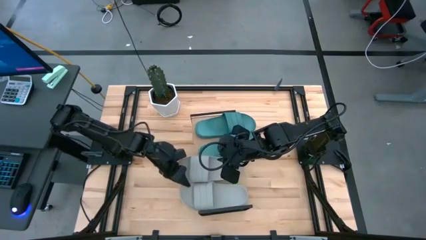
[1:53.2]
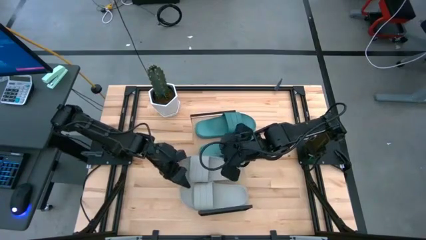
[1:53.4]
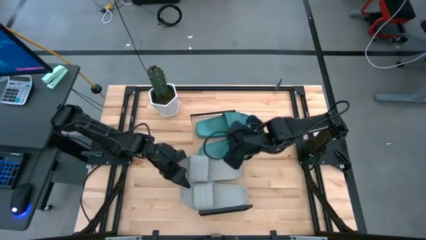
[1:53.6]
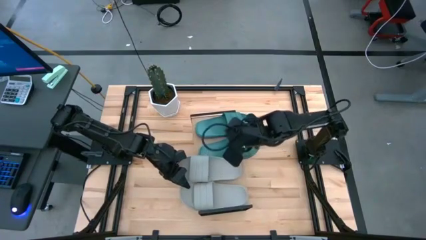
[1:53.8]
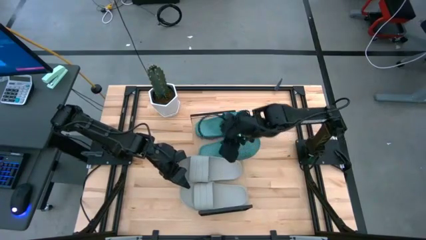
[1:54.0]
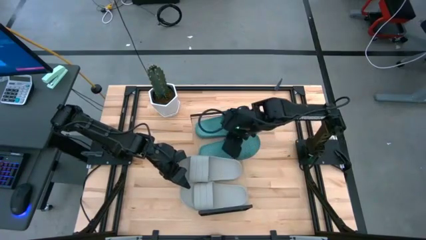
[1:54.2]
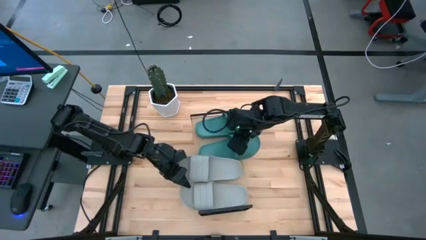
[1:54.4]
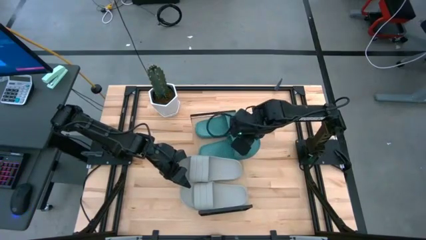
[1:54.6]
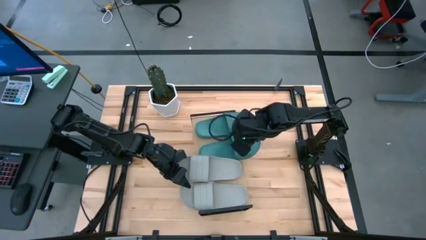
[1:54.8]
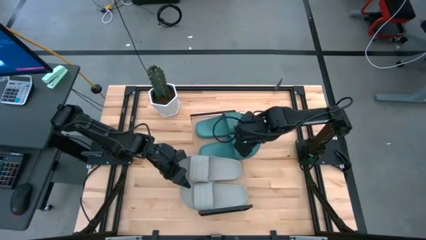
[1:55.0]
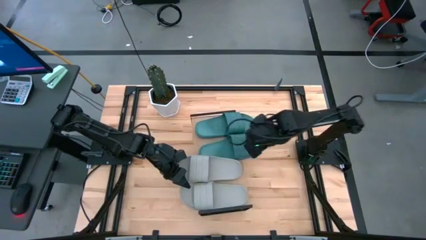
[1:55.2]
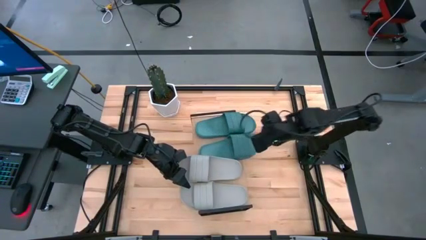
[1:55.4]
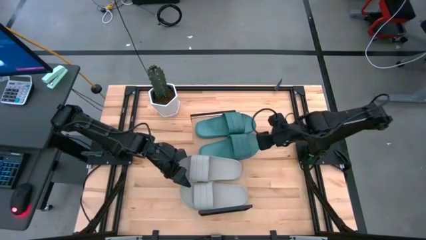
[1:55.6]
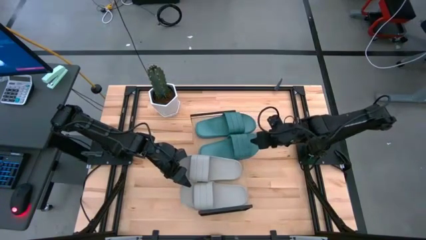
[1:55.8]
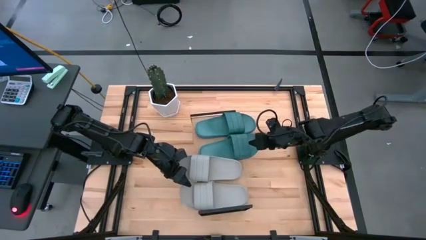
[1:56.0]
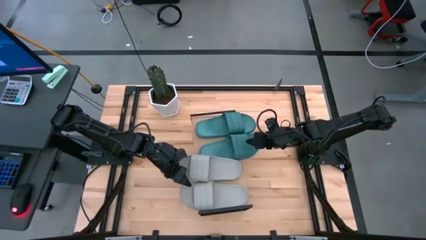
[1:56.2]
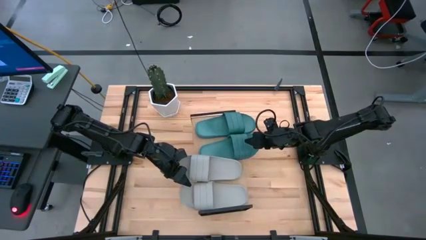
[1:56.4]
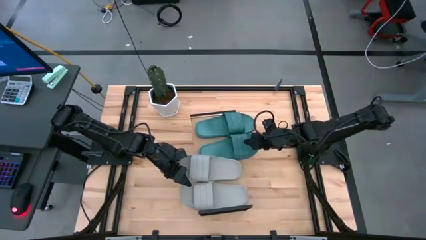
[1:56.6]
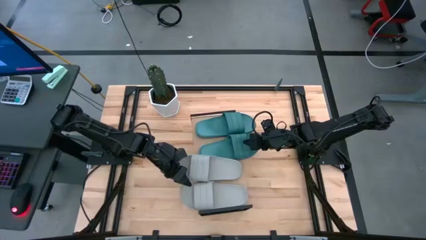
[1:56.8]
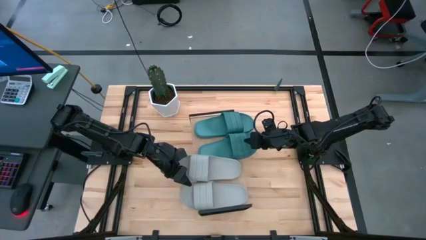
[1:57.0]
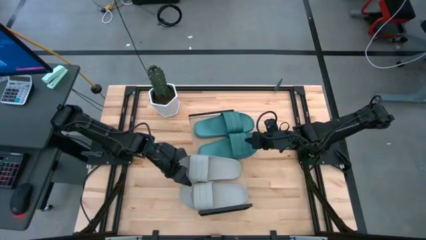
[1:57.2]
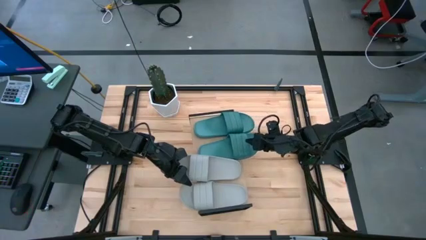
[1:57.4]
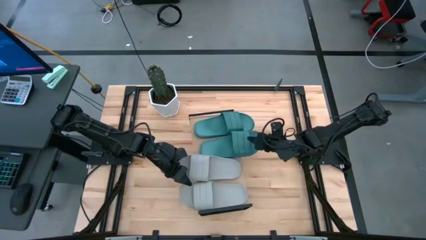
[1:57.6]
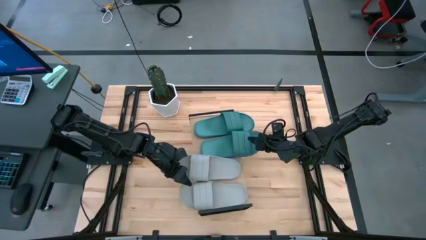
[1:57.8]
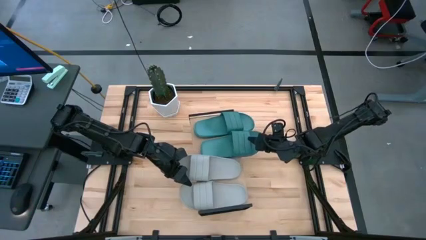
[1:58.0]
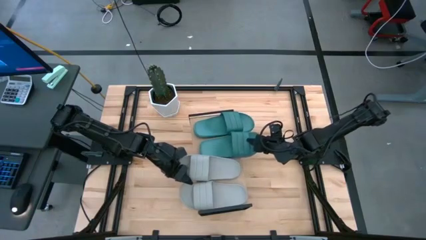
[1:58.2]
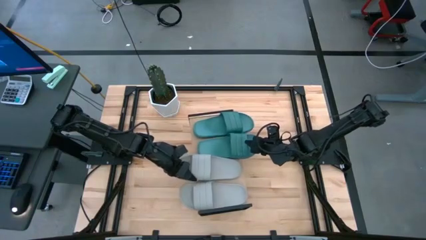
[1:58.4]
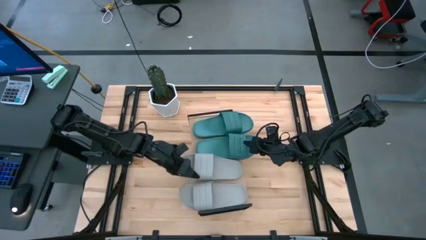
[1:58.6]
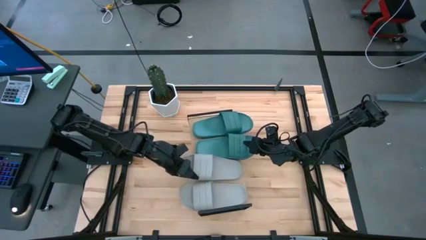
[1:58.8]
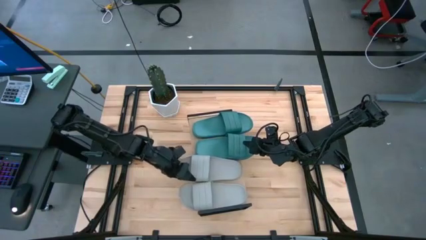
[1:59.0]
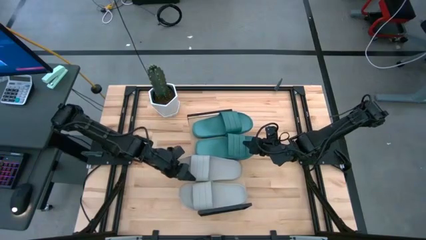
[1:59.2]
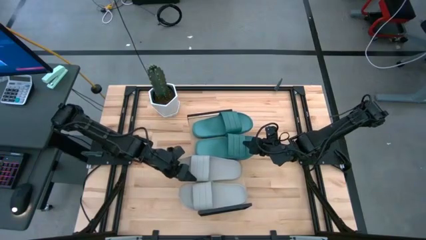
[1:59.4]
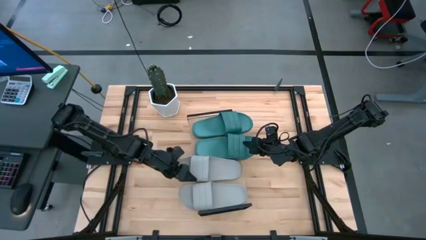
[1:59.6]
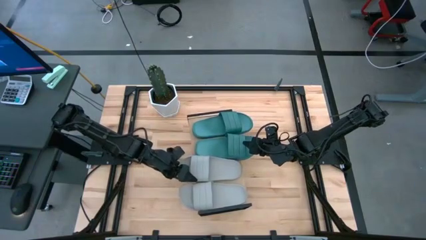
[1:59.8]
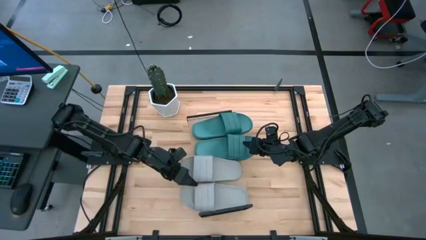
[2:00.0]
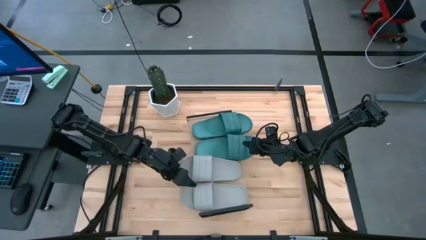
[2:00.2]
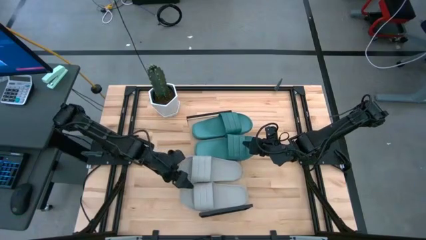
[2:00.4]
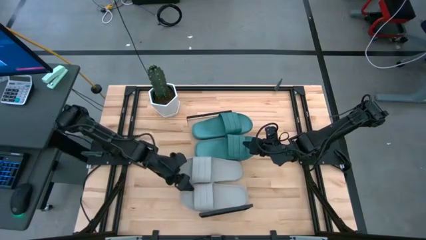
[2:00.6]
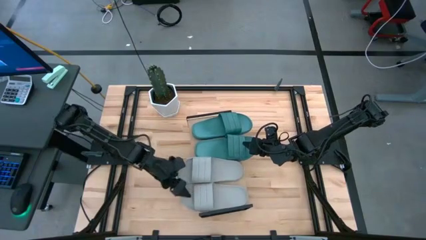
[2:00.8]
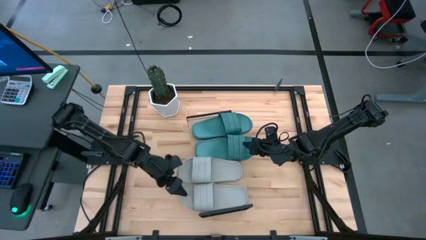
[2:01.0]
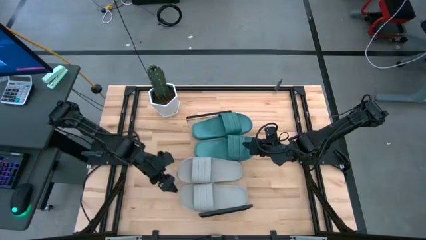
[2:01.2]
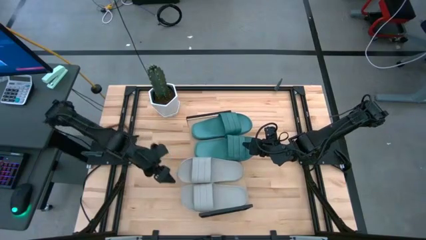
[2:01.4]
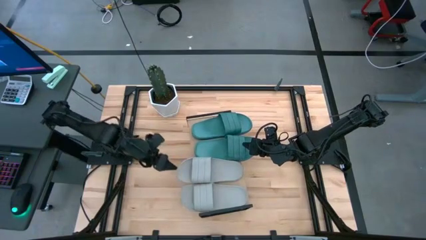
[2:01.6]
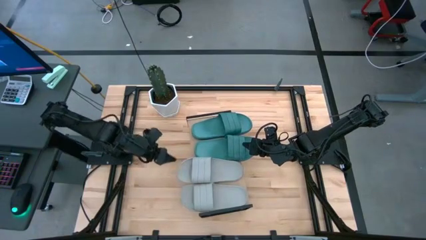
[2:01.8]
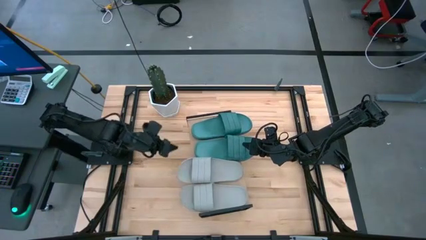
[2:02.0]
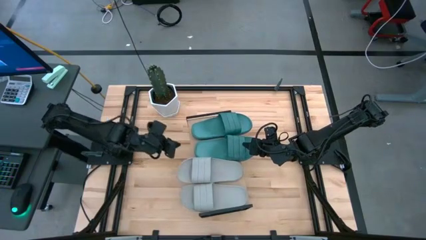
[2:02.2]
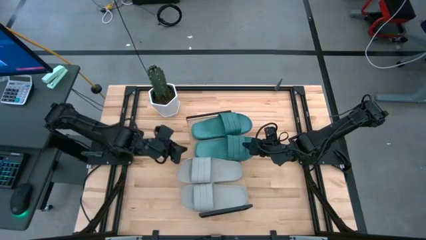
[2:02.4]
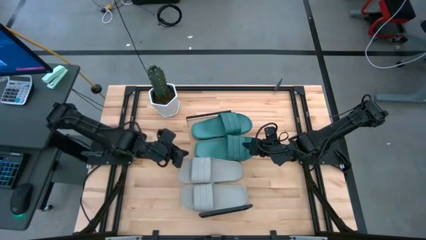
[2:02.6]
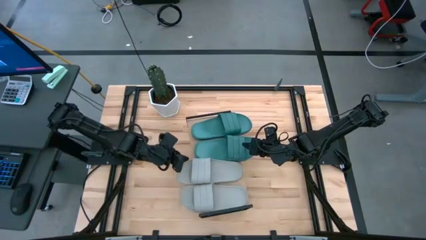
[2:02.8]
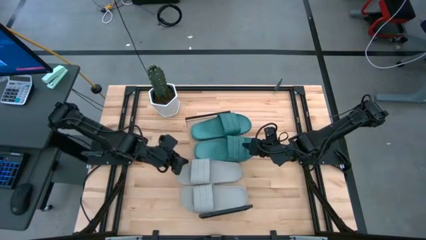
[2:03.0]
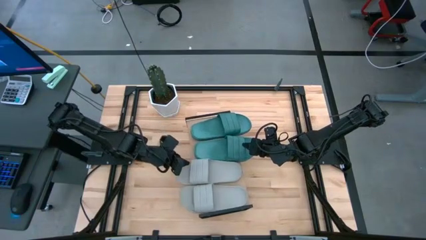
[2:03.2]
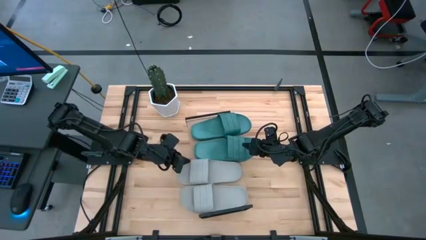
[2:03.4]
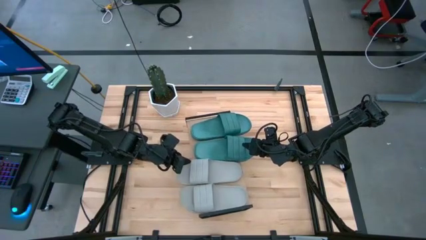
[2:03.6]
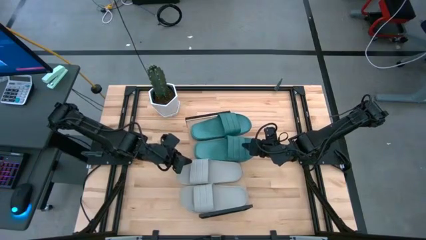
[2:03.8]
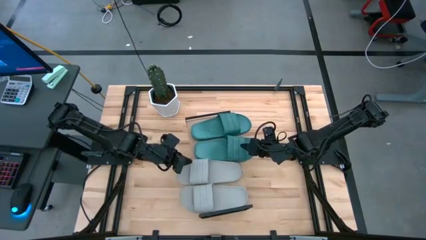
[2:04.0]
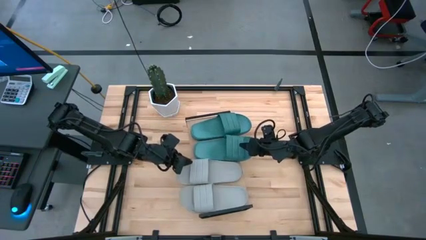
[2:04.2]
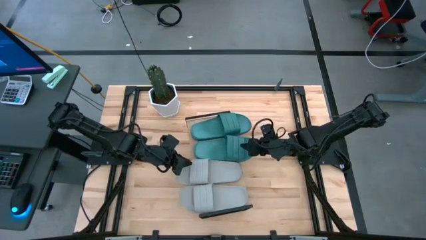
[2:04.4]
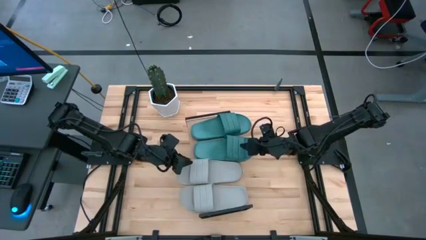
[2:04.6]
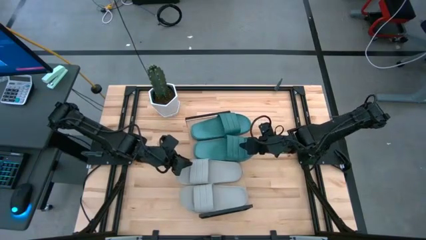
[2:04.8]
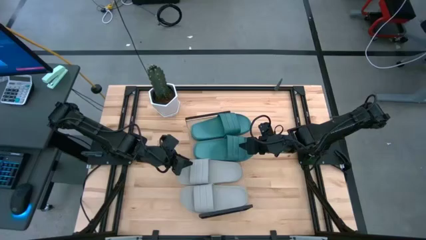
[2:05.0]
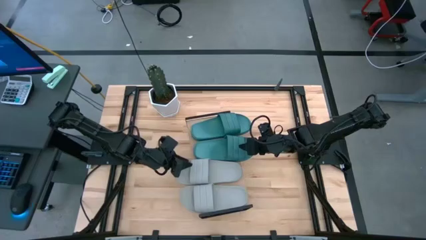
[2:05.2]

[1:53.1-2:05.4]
Task: Pick and place slides into the shelf
Adjust the slides on the shelf

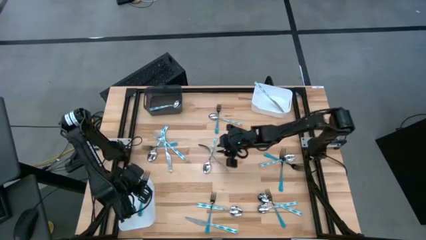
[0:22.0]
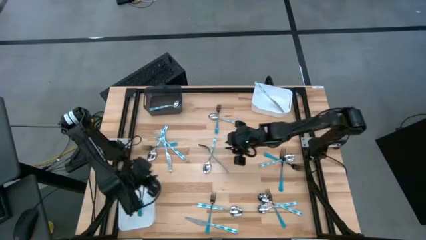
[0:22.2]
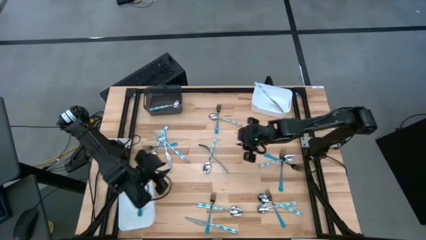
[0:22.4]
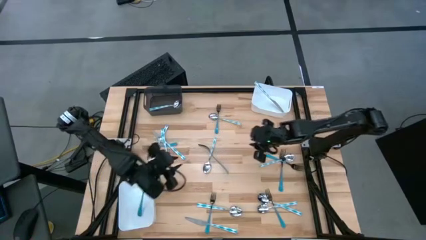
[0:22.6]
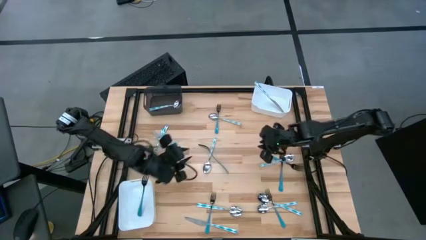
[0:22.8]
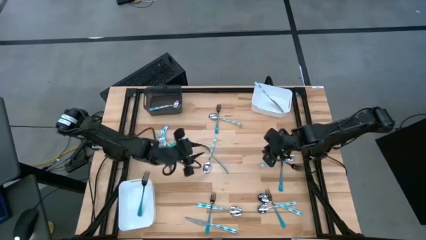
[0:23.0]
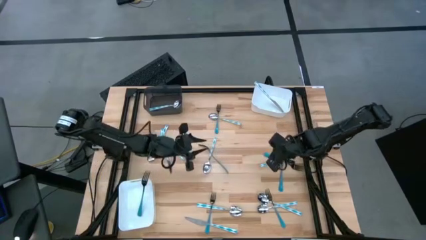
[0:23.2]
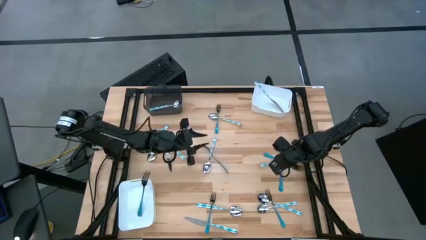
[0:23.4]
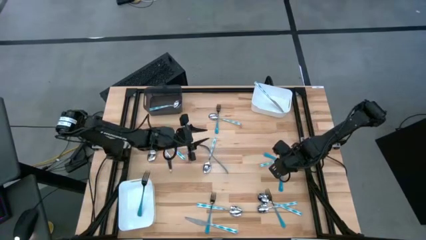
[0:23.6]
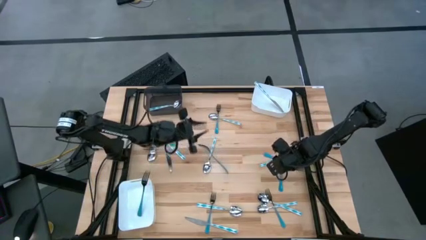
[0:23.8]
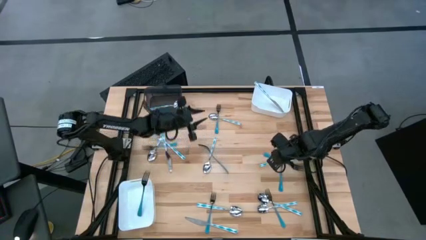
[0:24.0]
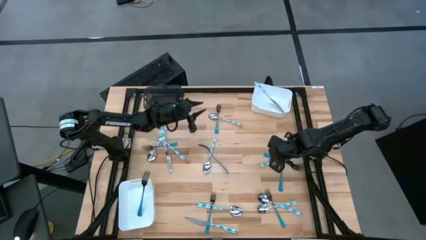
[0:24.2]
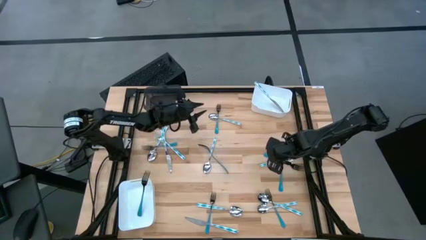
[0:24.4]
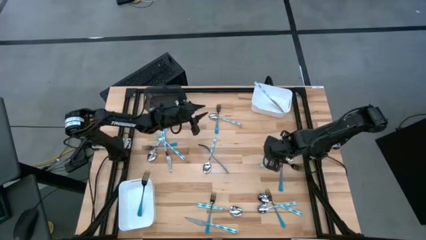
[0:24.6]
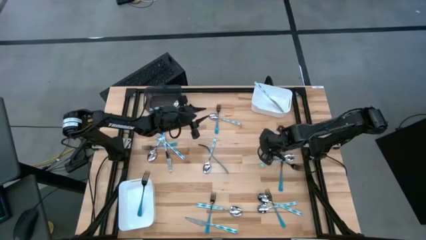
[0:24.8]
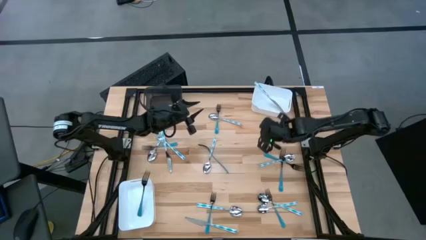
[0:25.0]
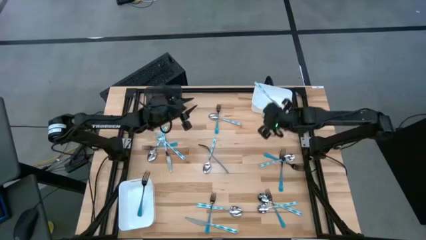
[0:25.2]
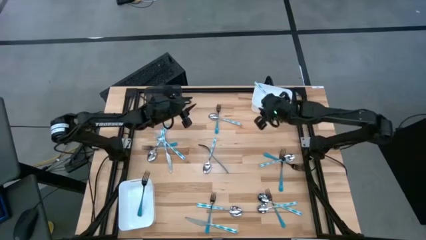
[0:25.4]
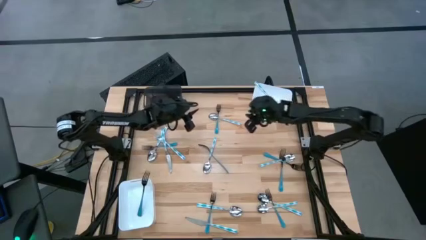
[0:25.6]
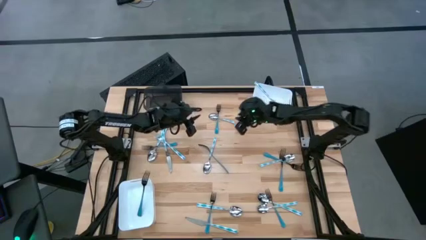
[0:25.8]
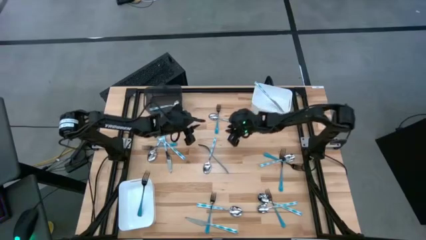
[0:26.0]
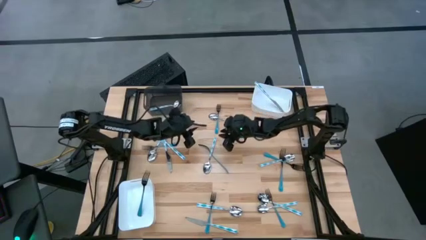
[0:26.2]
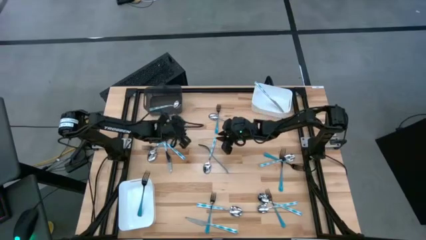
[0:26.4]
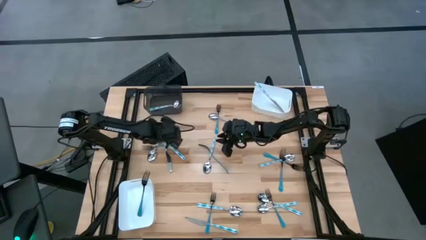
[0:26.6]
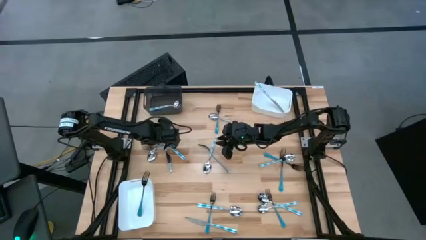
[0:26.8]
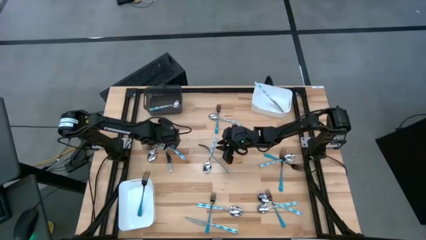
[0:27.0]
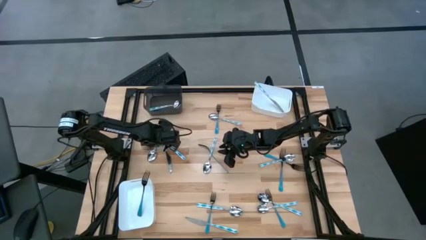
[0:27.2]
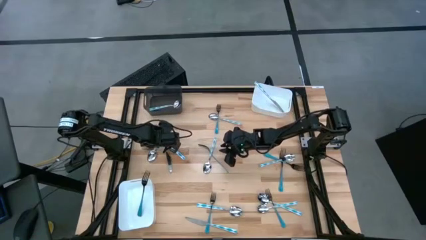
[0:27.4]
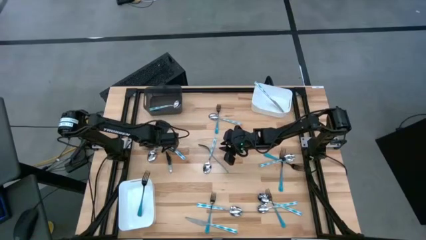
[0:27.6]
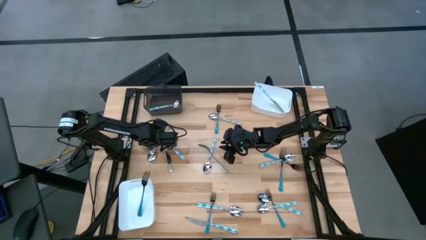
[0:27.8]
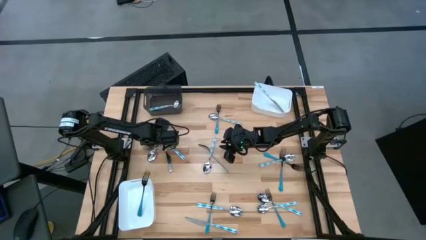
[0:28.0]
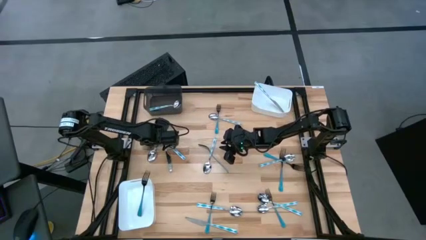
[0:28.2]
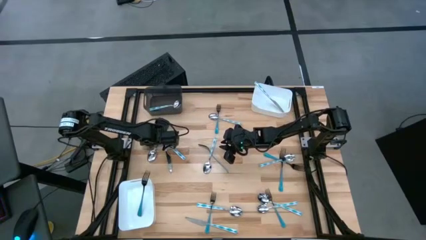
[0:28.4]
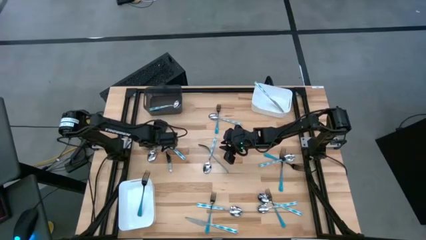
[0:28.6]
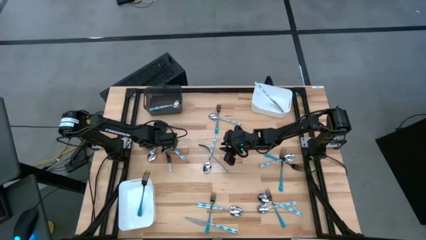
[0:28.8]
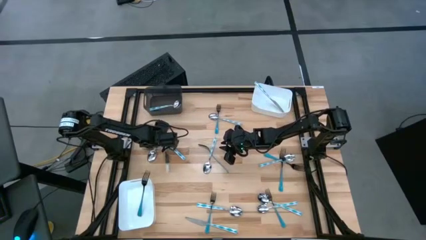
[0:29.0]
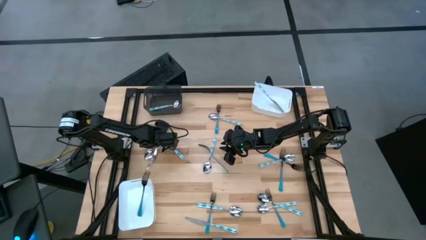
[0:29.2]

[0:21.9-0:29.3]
Task: Sort silverware by color (type)
Put the blue patterned table knife into the top white bin
